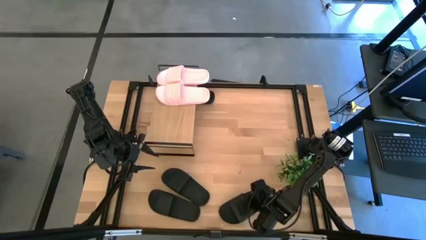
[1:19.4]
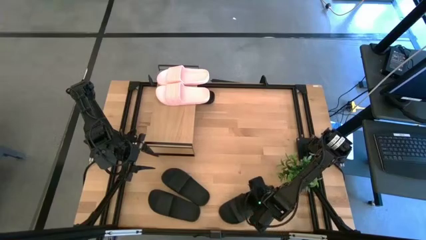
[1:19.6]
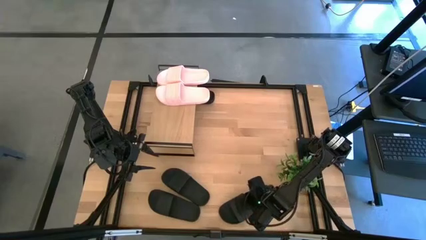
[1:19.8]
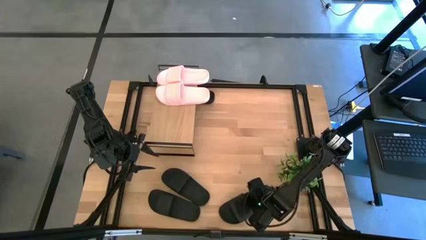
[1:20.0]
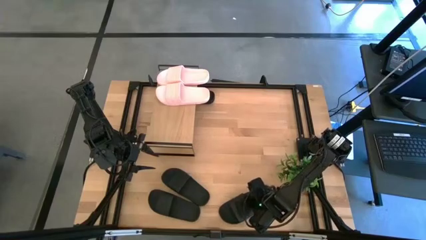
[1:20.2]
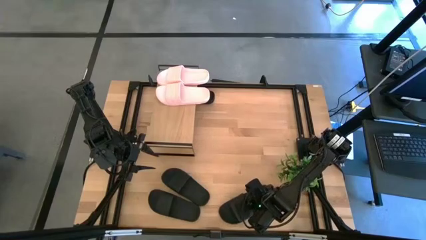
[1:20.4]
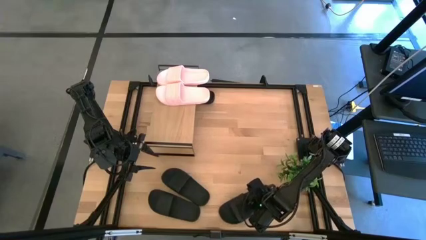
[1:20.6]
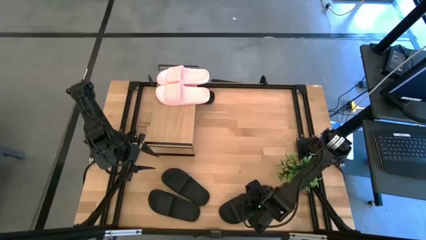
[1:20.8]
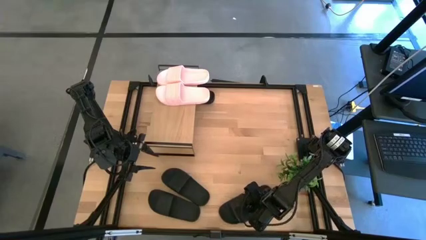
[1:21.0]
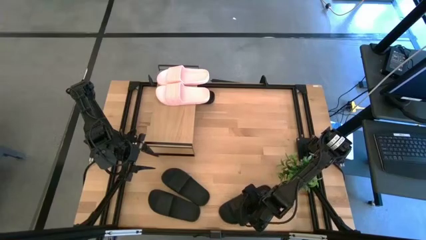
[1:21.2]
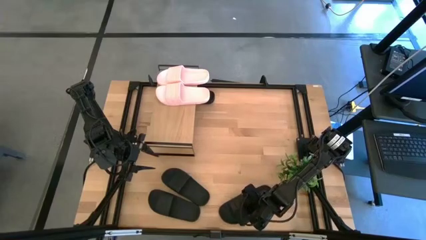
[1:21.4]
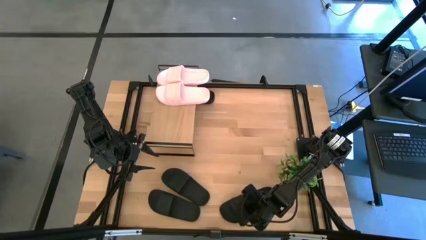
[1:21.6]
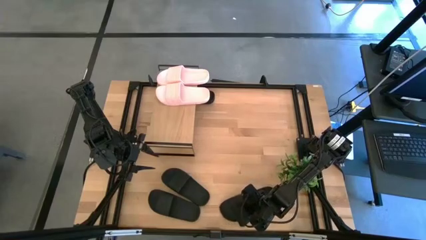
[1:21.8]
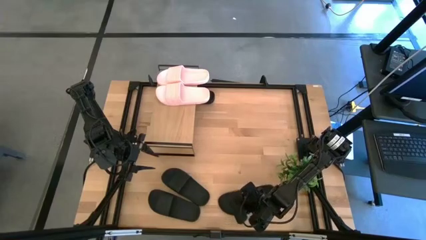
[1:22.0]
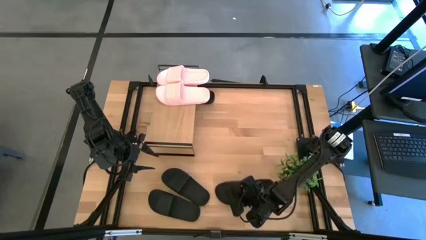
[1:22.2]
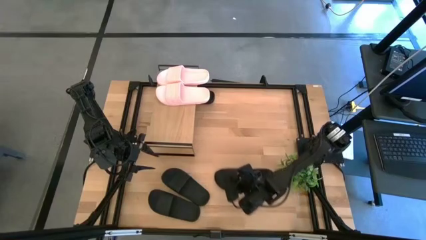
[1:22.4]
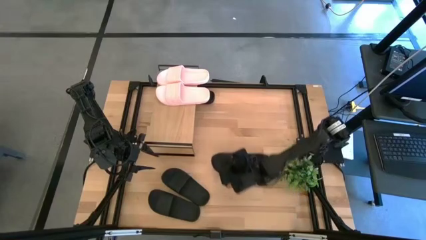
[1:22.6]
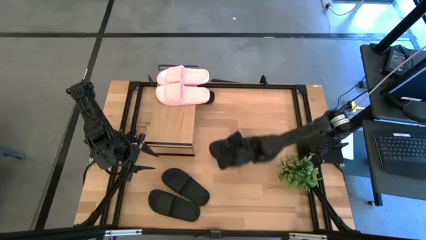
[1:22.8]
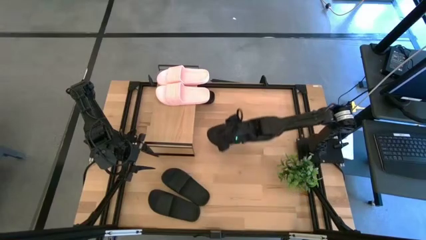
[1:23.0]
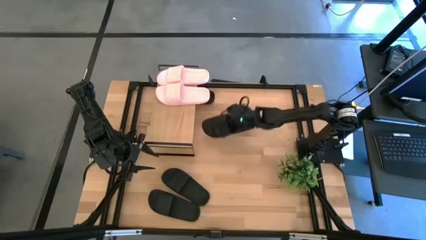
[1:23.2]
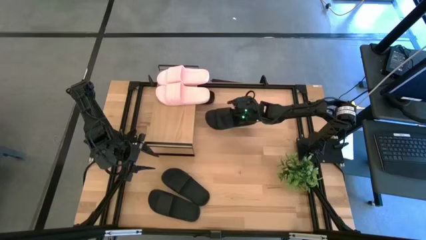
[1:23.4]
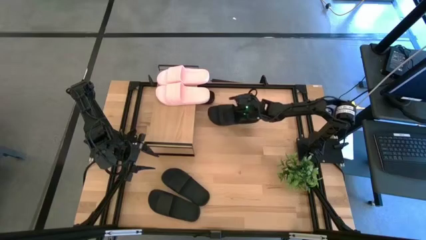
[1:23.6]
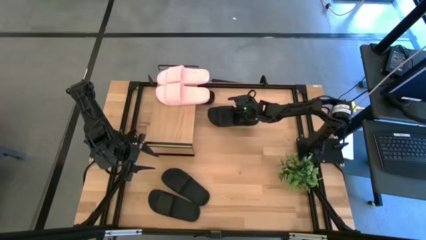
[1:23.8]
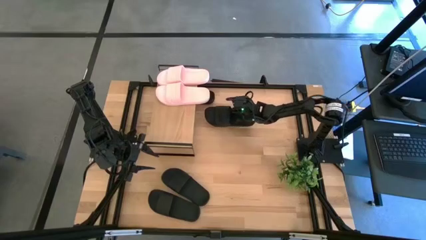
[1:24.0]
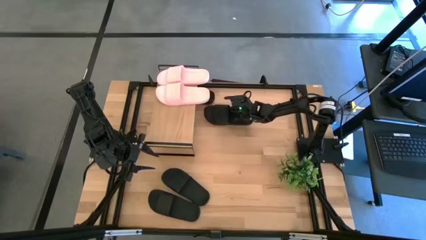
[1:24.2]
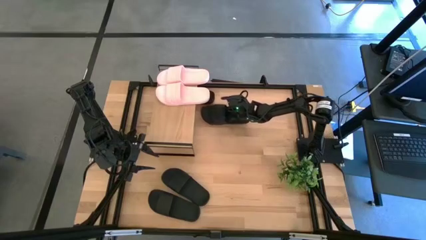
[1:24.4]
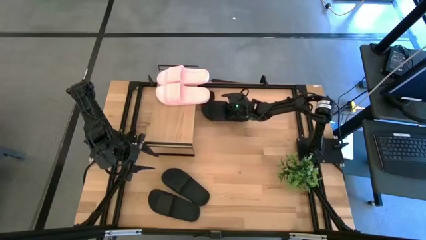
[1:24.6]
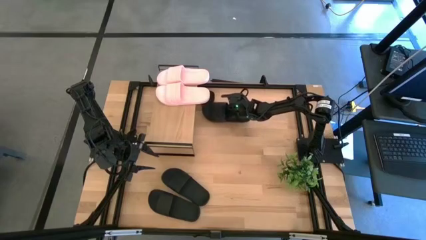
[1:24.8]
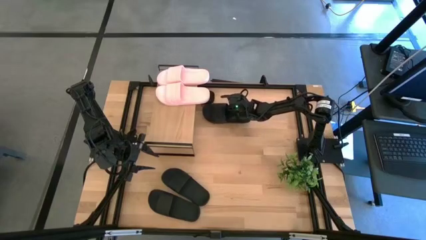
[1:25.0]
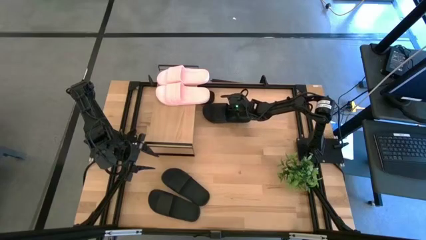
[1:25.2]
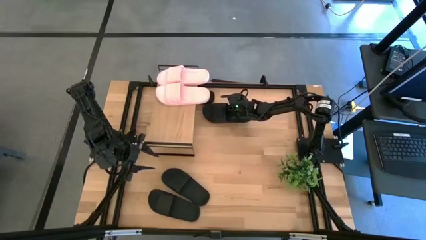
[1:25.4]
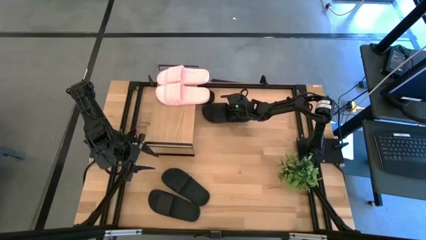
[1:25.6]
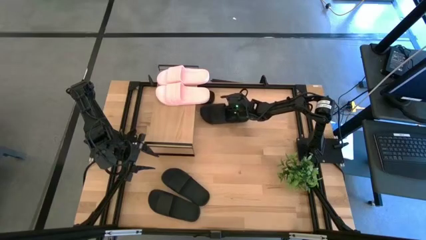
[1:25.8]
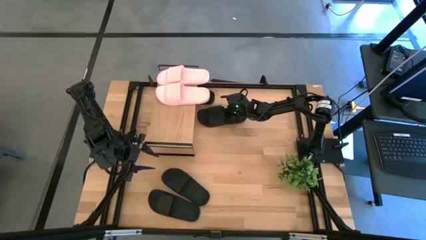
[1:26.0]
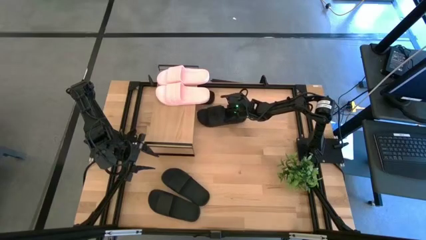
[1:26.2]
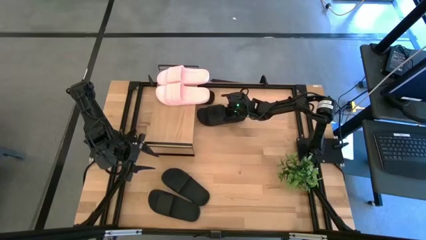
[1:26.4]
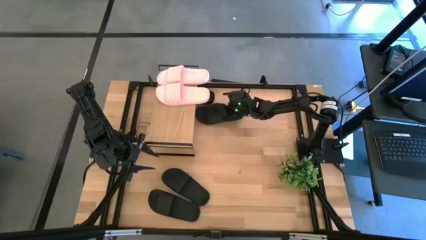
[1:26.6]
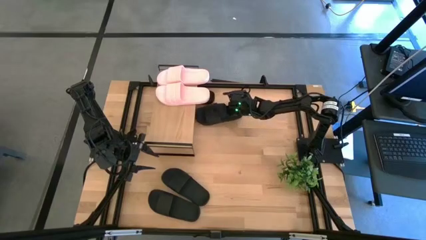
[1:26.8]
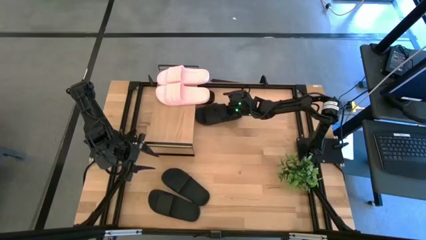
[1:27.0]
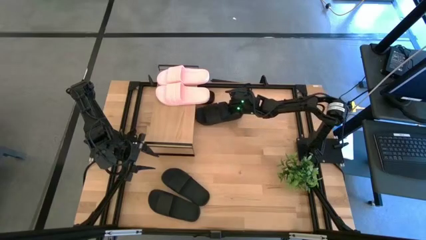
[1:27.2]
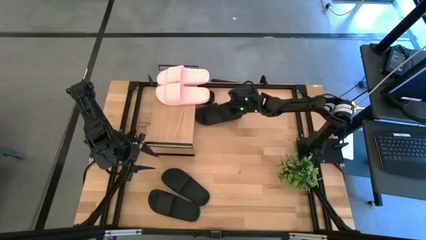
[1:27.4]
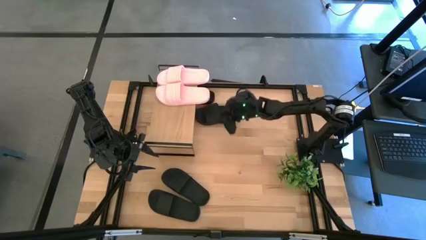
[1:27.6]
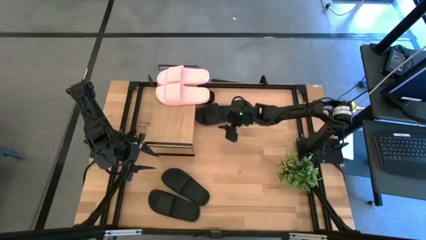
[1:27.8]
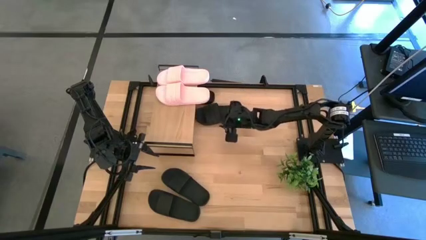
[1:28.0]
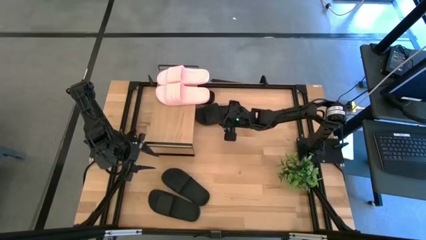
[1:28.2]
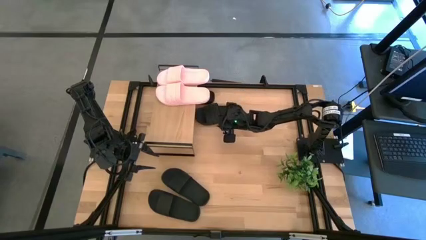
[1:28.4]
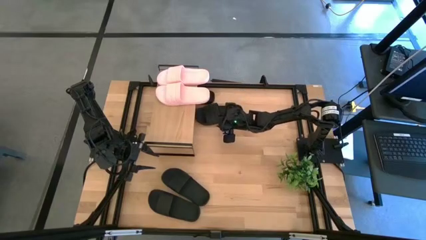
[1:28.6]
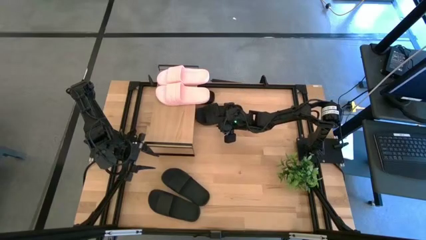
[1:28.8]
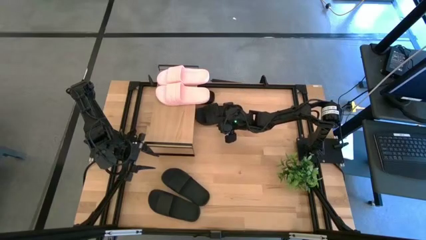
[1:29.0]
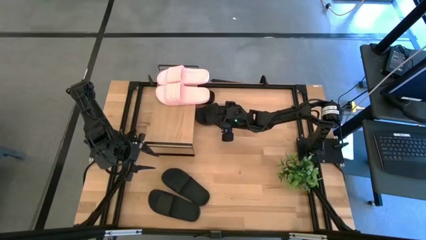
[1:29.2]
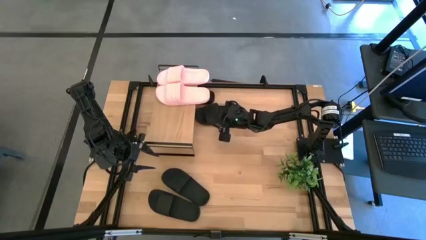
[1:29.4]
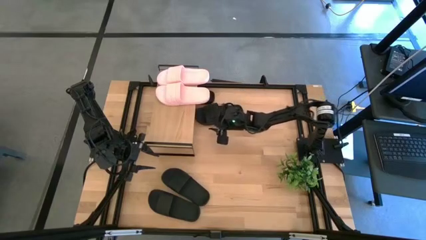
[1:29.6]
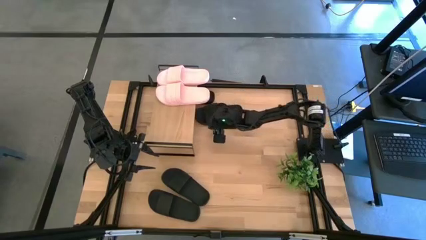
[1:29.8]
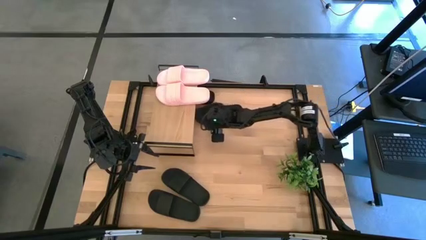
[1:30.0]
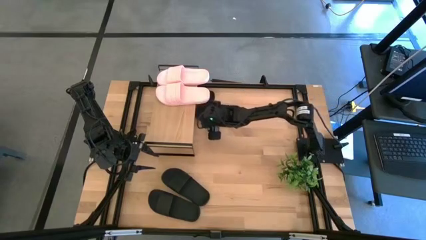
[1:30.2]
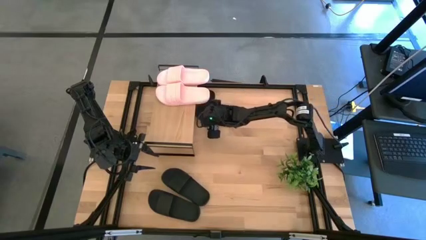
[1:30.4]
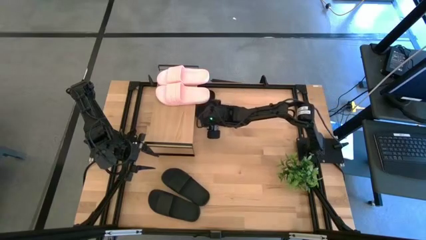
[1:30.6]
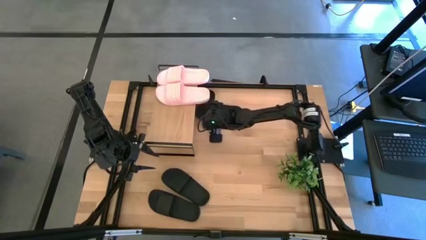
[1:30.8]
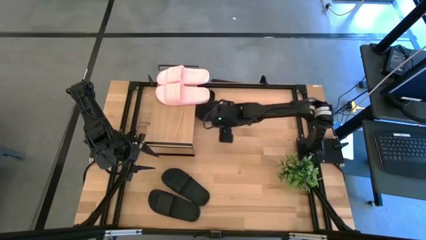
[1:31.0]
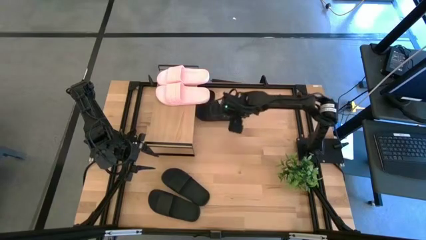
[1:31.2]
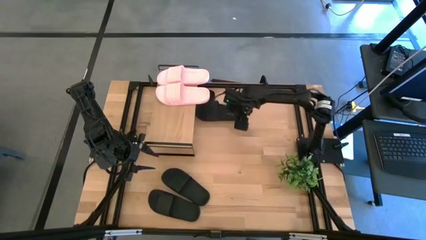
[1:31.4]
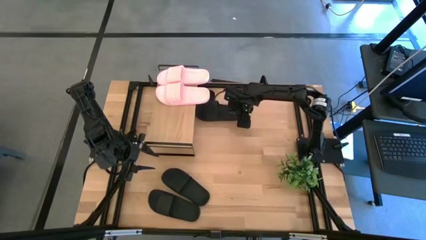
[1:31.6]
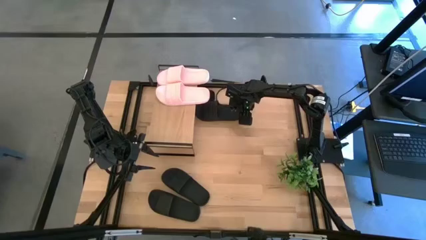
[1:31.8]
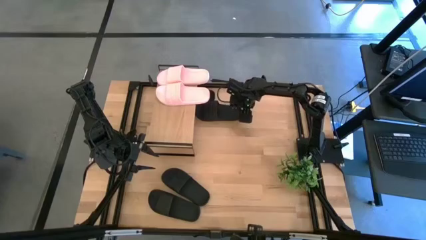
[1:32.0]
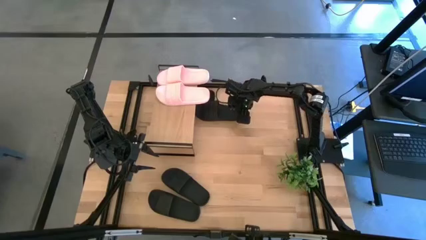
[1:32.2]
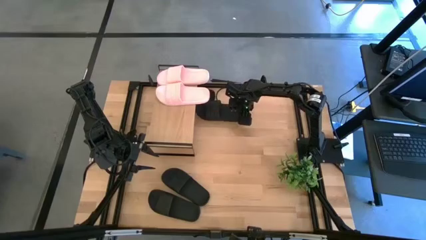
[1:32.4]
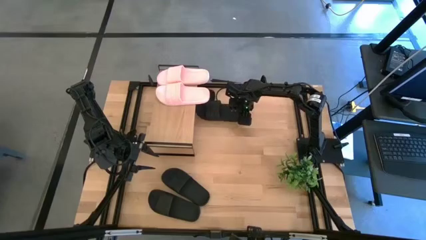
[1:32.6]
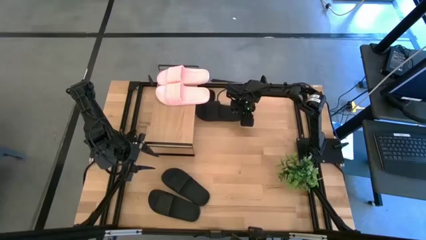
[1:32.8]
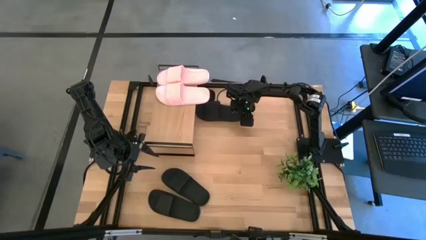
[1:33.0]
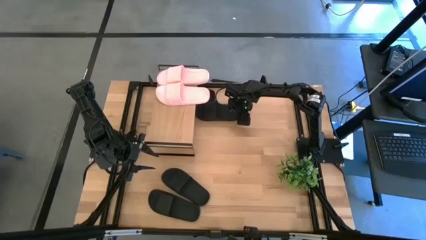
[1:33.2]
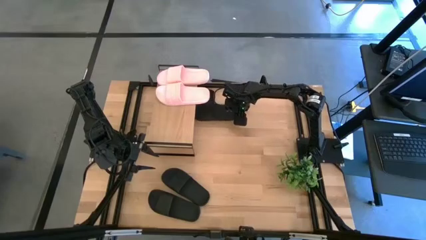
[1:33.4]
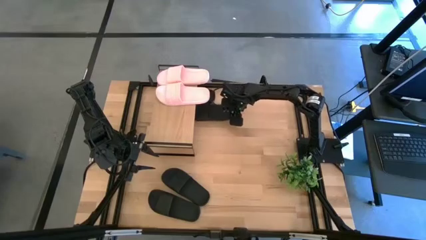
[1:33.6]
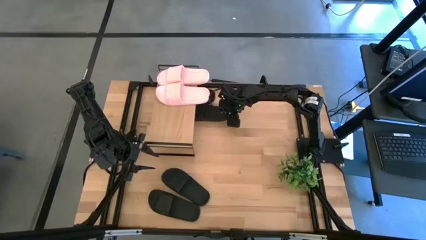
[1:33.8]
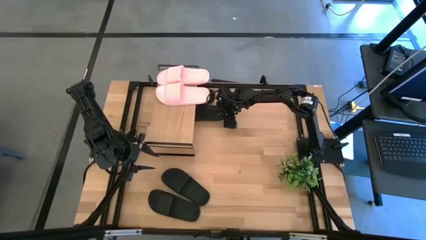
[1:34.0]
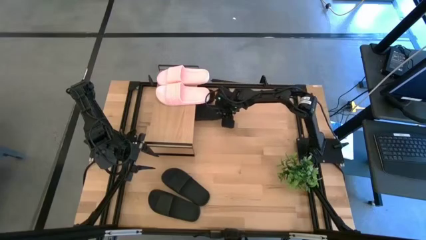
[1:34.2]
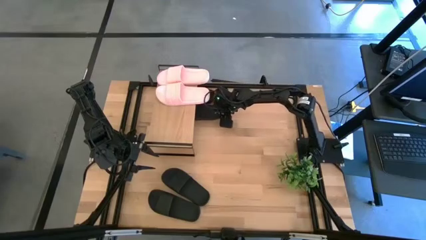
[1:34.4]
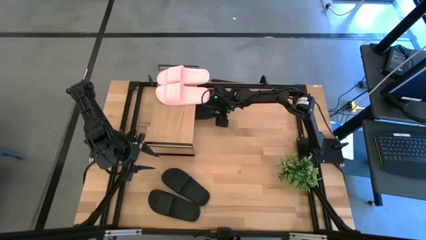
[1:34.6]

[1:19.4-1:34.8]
Task: Pick and place slides into the shelf
Put the bottom right black slide under the shelf
